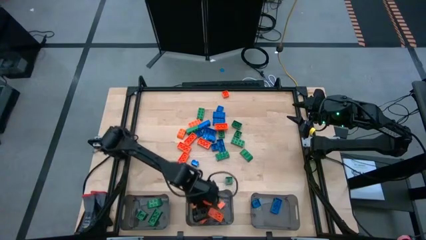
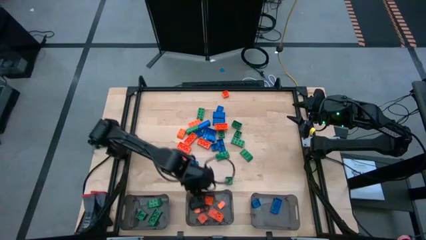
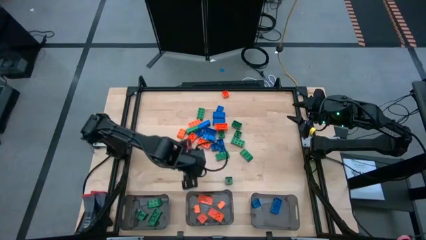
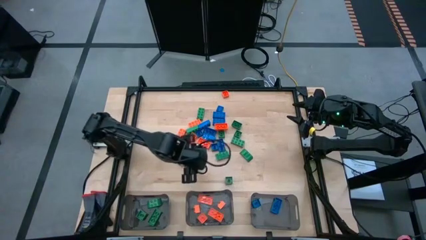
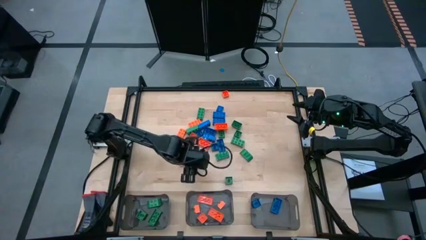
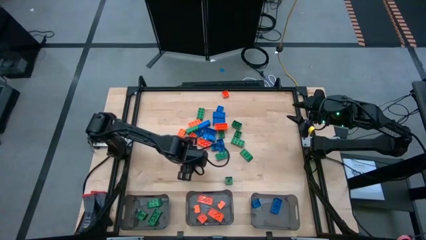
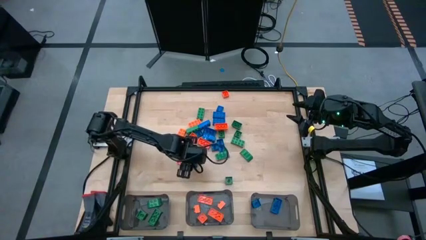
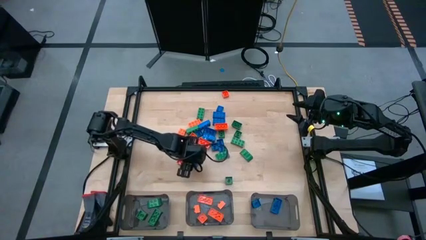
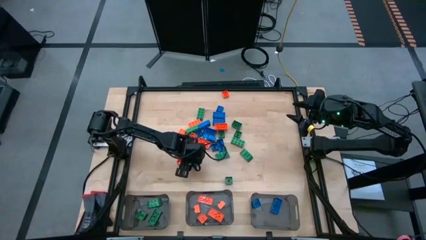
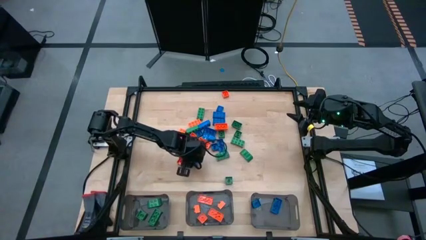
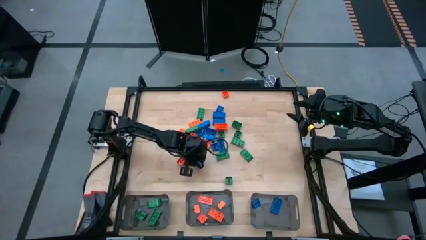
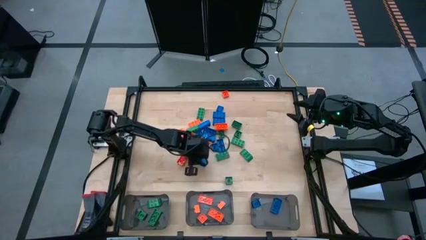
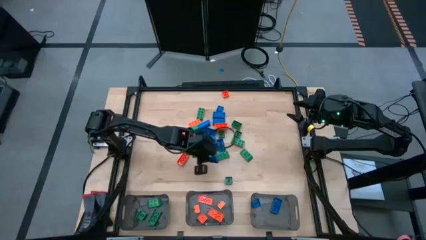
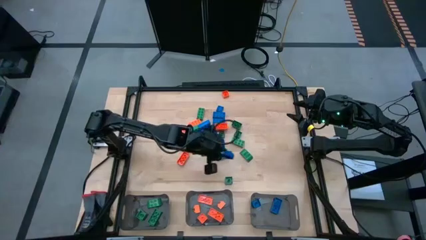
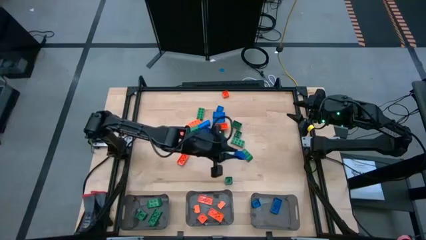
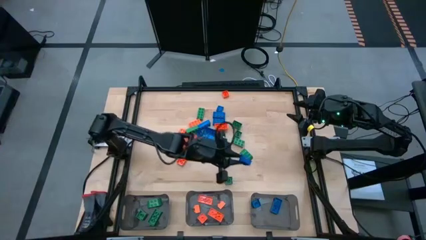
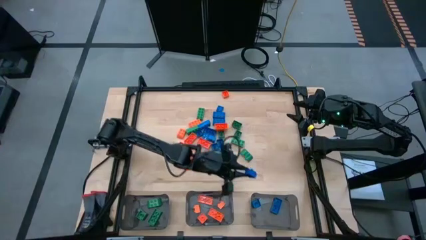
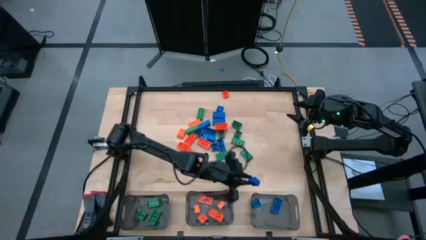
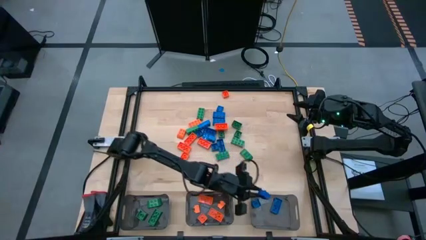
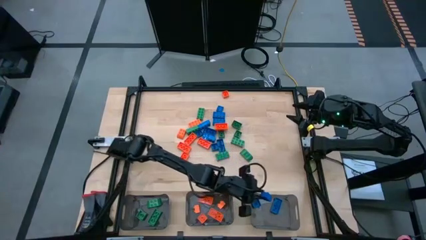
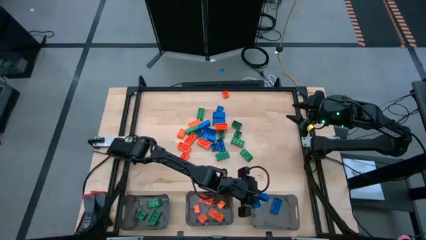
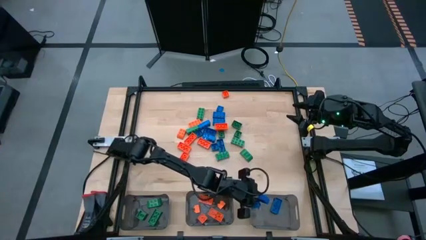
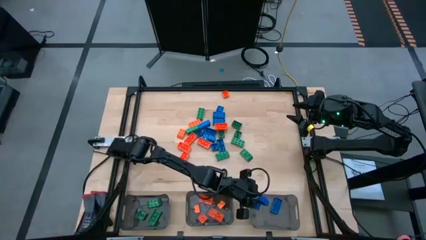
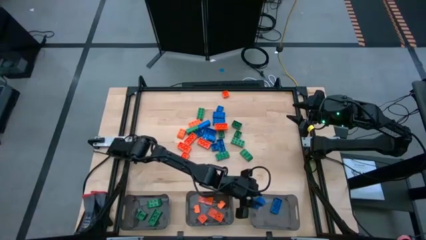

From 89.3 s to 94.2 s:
Task: Sort blocks
Put the blue game piece into the right black bin

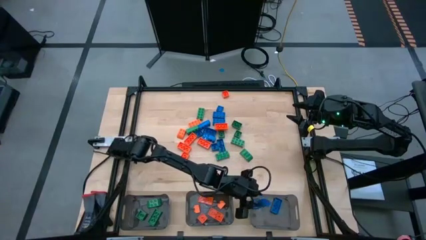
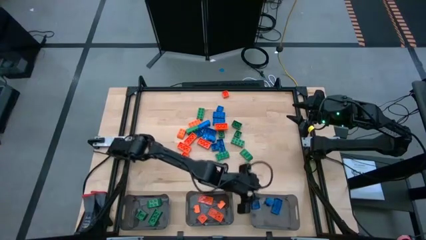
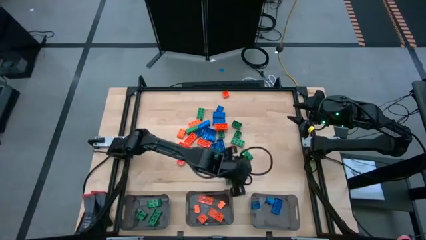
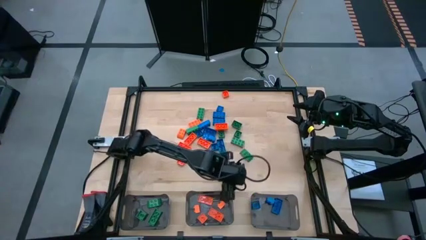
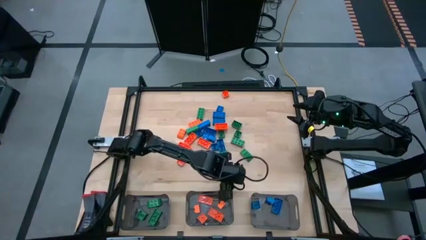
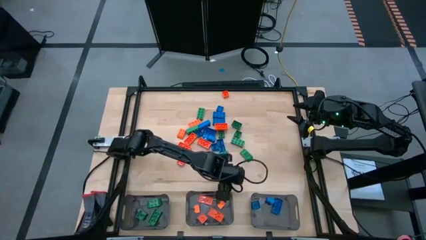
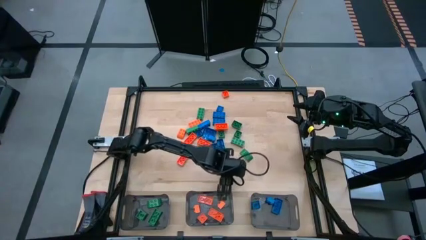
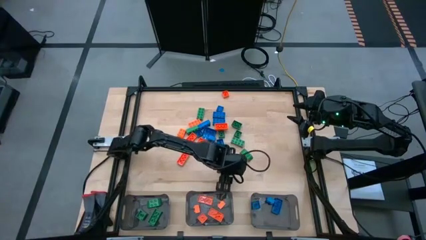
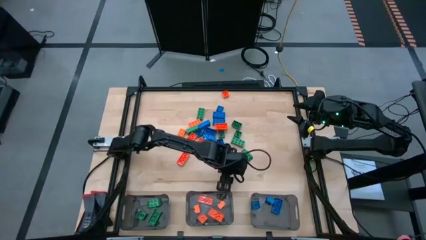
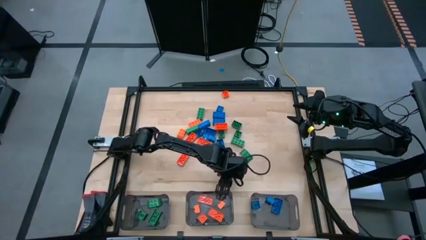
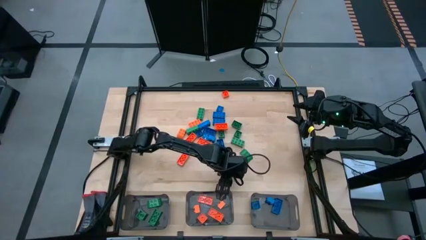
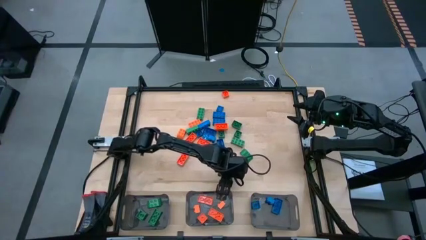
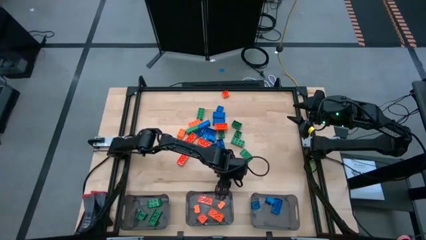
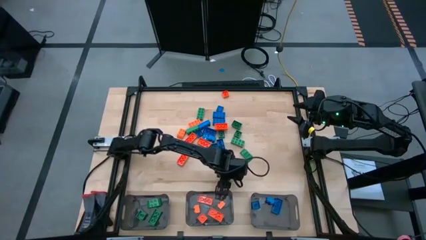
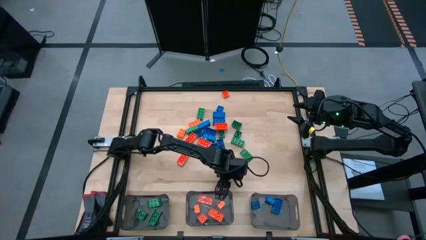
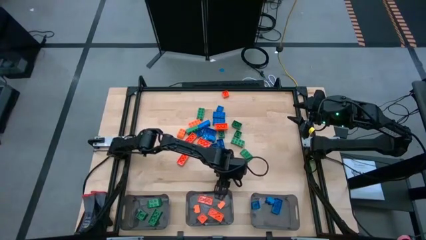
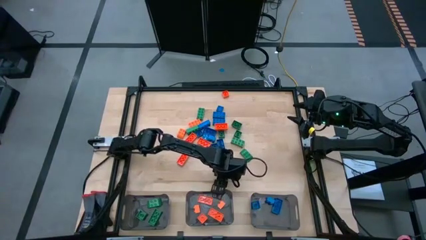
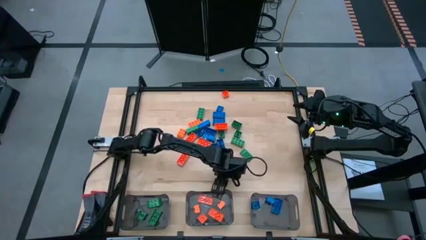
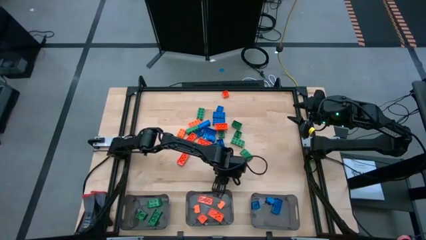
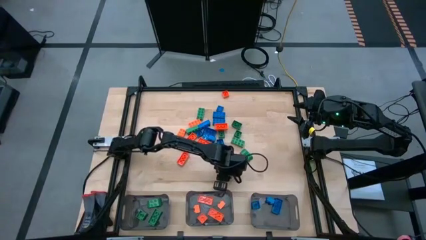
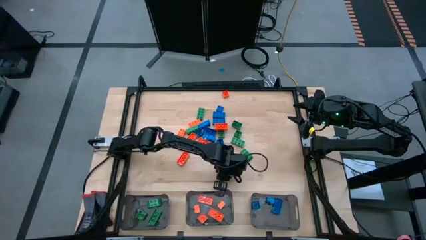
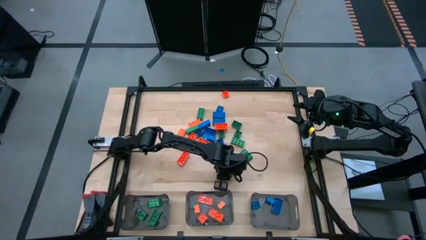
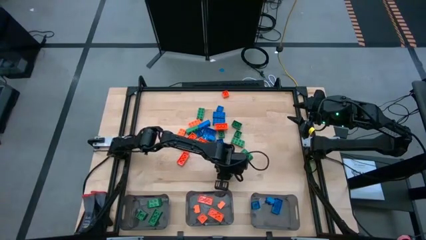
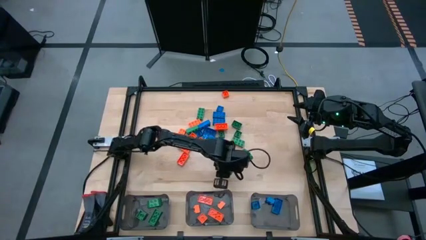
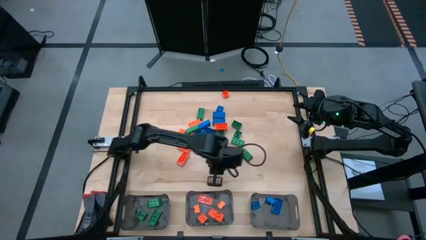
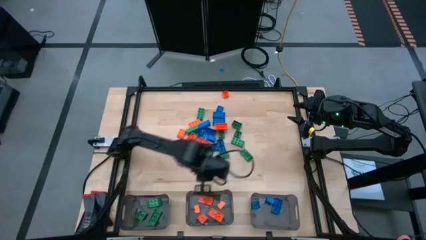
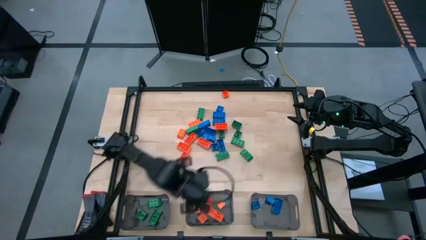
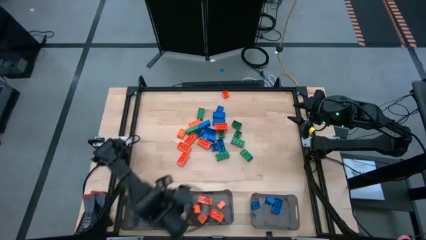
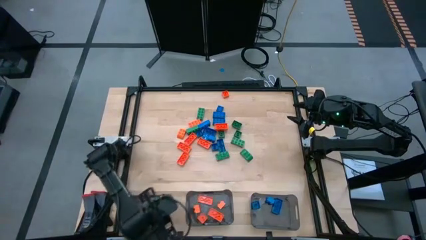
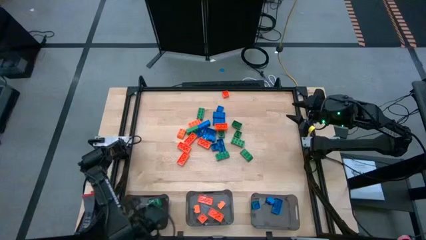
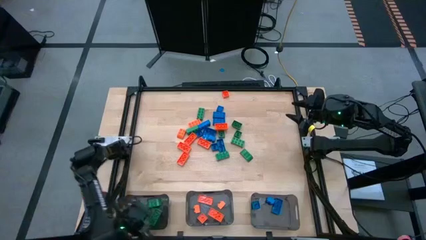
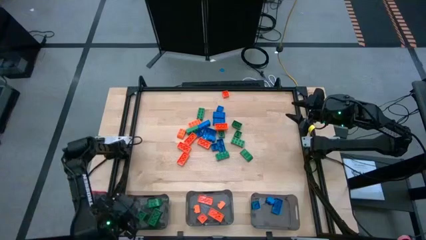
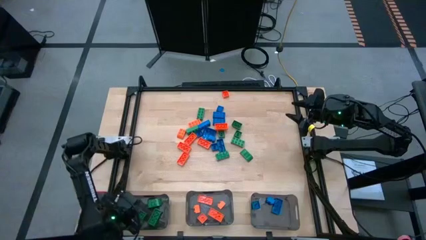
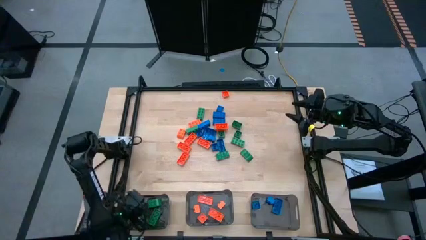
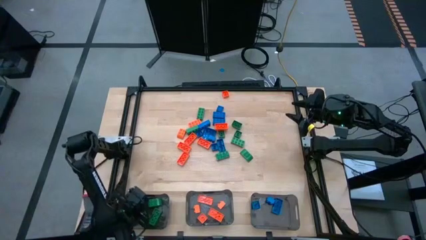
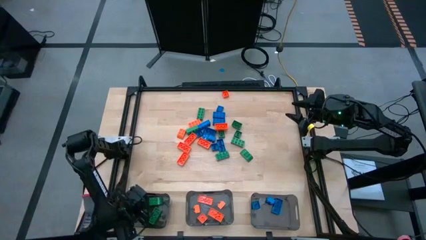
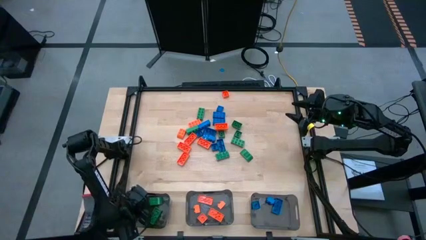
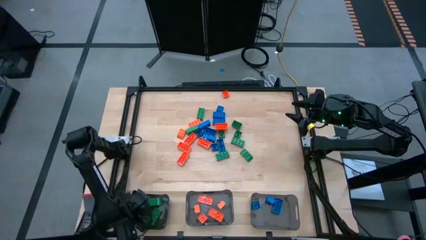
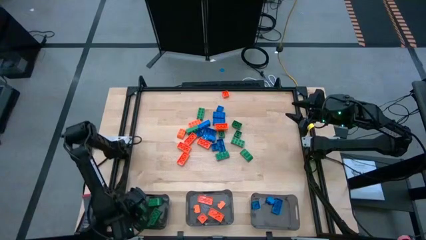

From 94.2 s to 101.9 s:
Put the green game piece into the left black bin

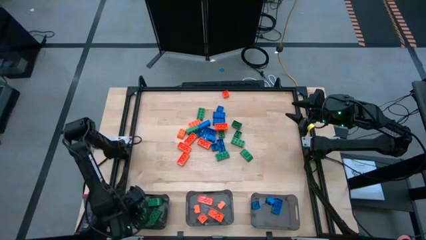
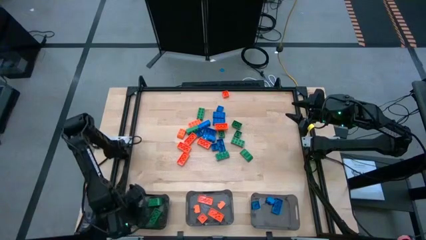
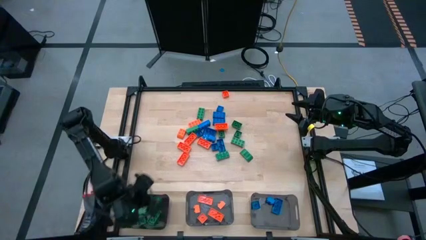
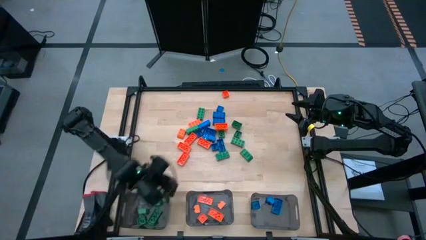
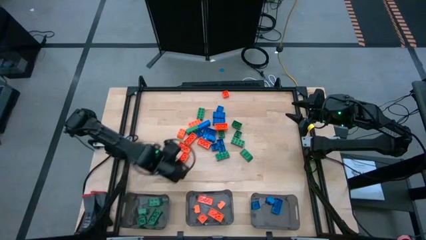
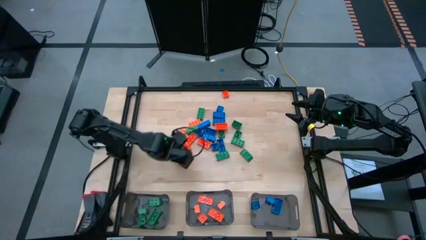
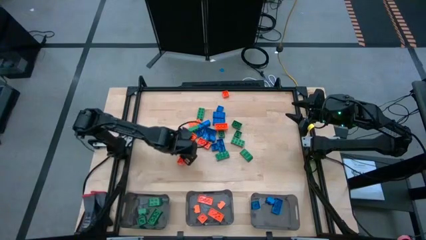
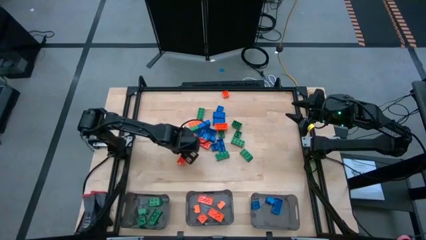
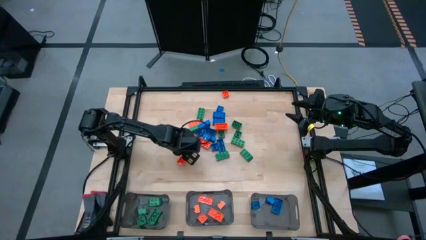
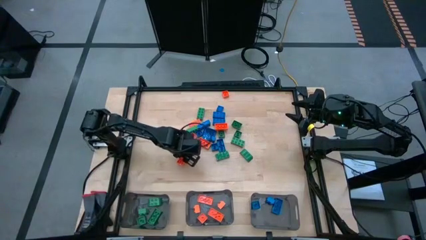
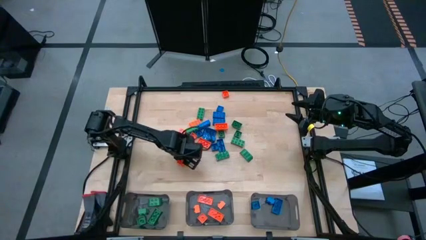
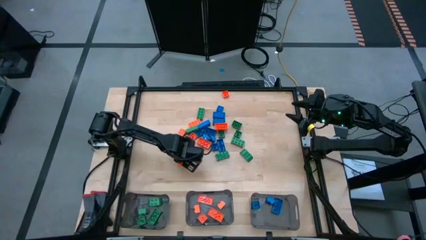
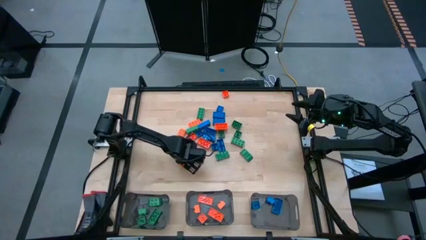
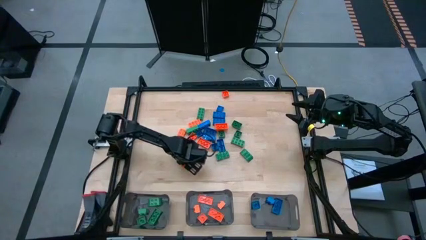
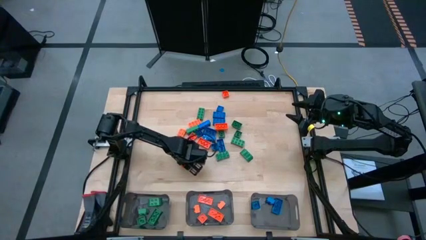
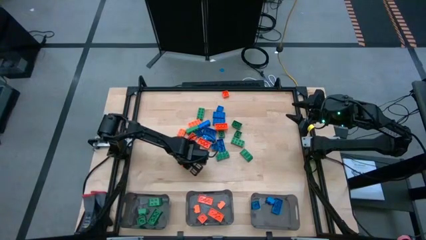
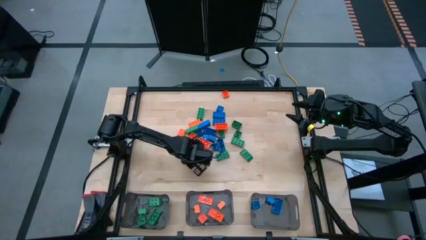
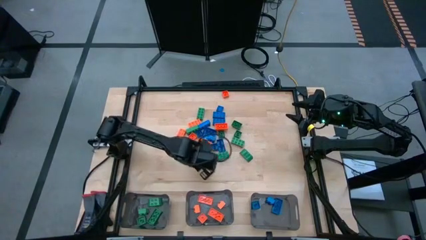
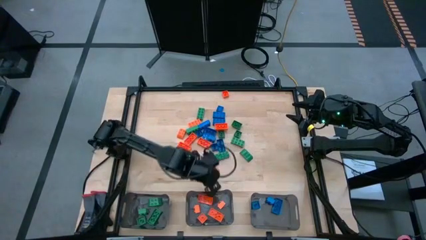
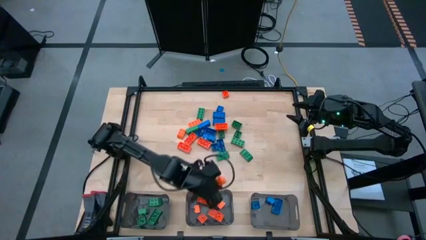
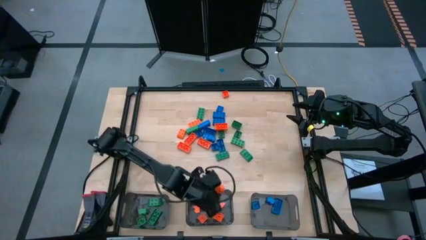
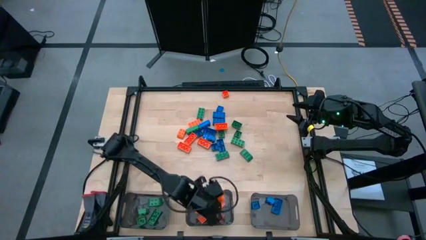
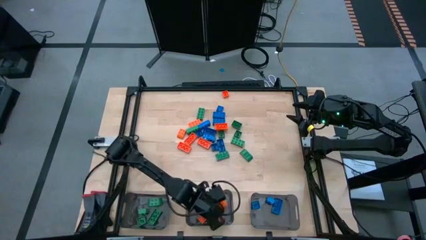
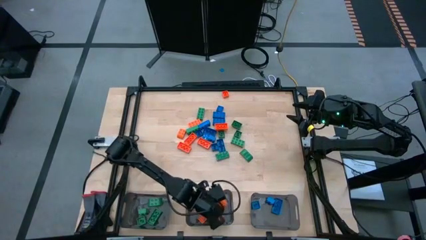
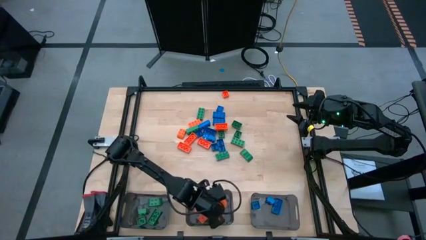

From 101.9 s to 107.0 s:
Put the orange game piece into the middle black bin
